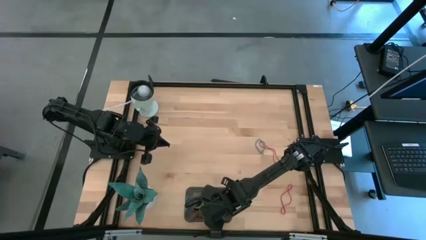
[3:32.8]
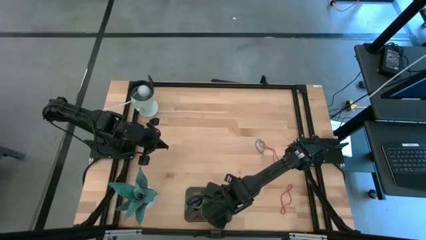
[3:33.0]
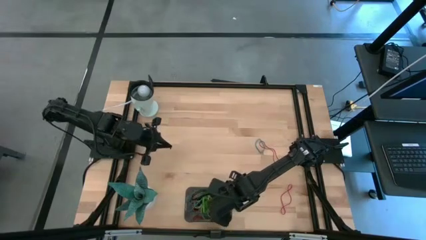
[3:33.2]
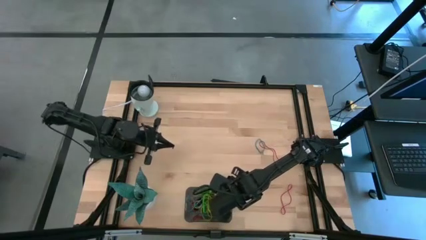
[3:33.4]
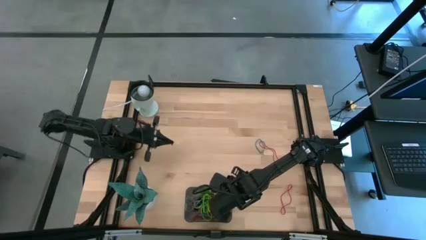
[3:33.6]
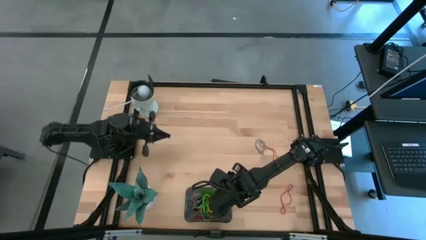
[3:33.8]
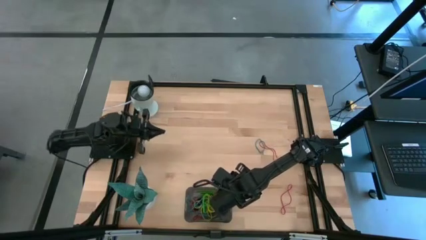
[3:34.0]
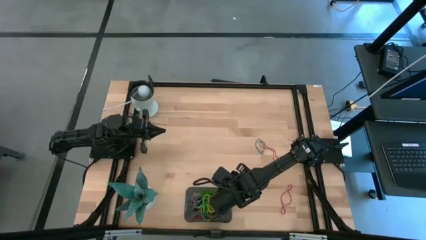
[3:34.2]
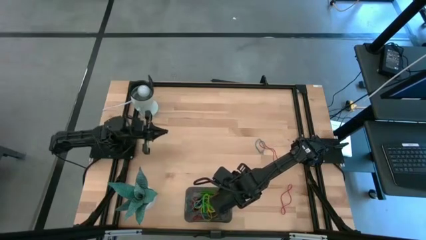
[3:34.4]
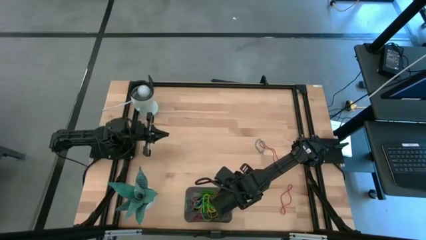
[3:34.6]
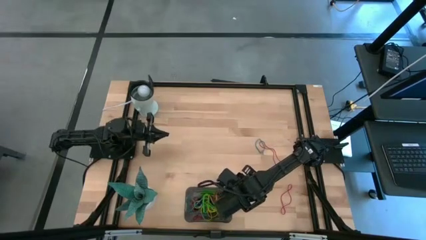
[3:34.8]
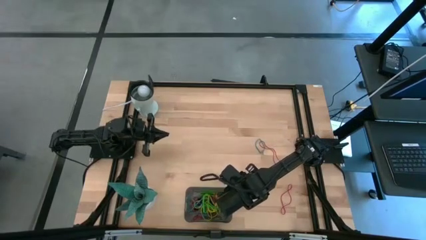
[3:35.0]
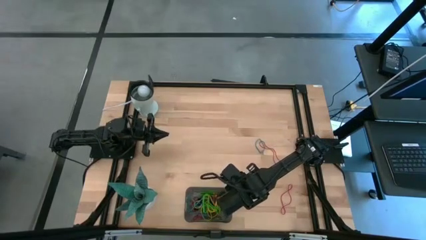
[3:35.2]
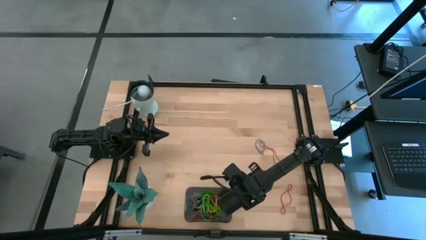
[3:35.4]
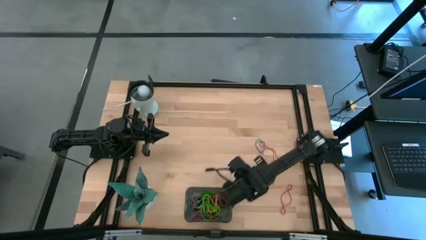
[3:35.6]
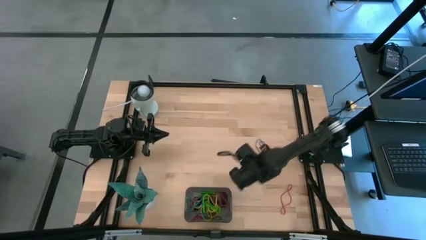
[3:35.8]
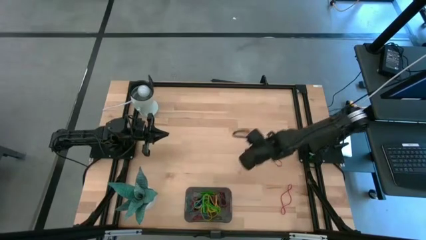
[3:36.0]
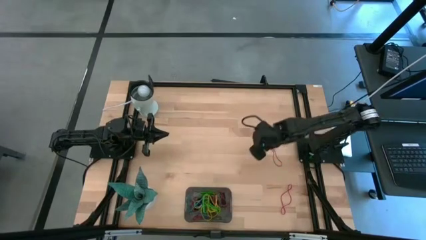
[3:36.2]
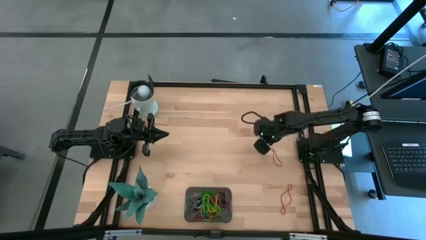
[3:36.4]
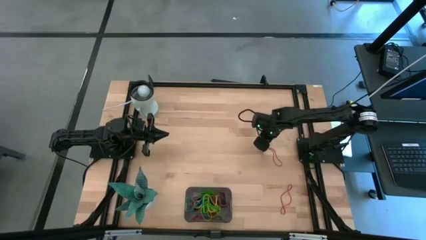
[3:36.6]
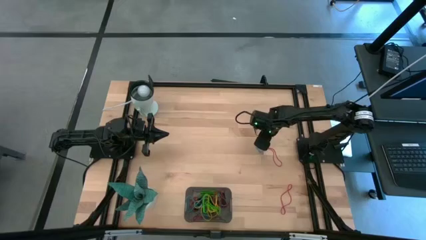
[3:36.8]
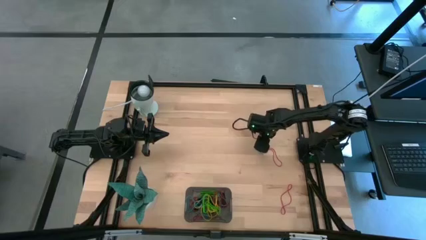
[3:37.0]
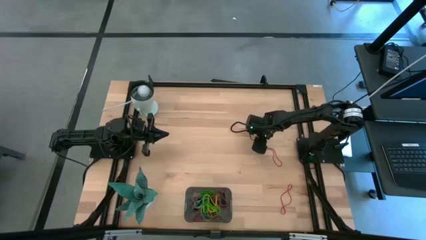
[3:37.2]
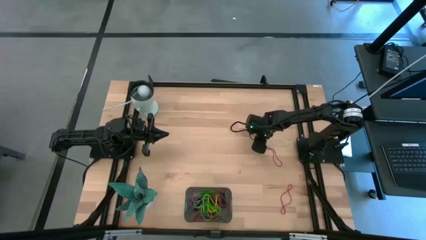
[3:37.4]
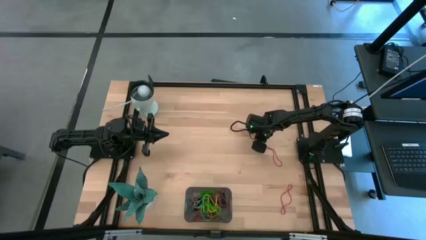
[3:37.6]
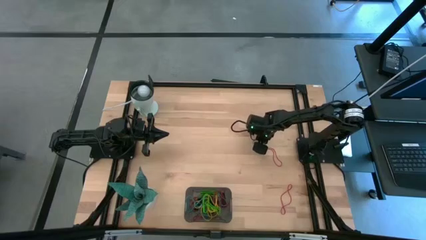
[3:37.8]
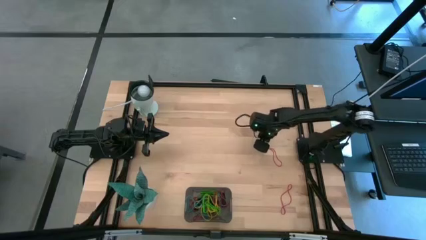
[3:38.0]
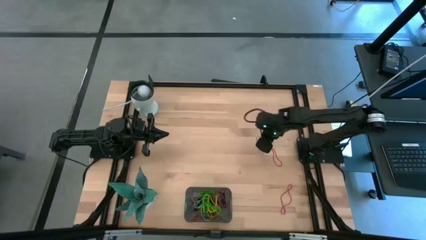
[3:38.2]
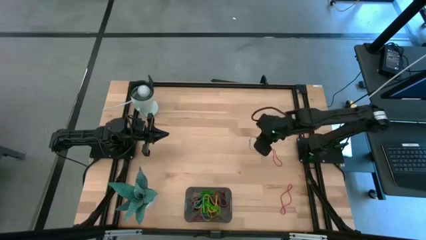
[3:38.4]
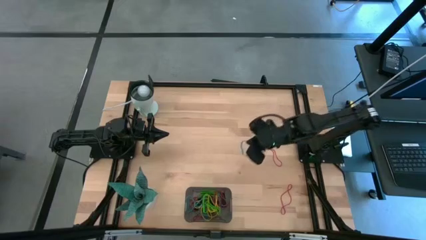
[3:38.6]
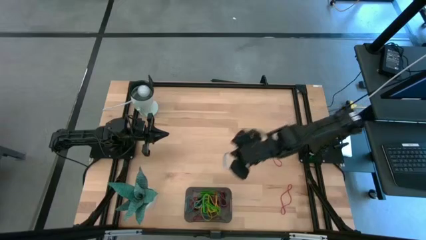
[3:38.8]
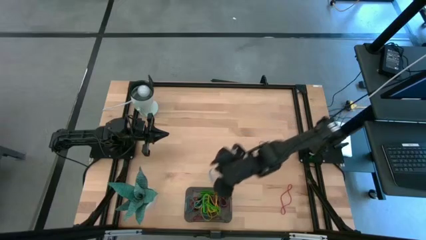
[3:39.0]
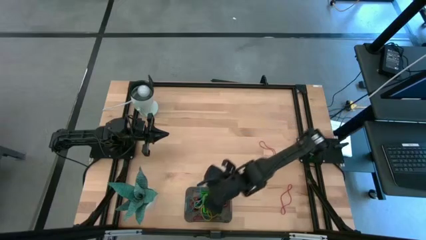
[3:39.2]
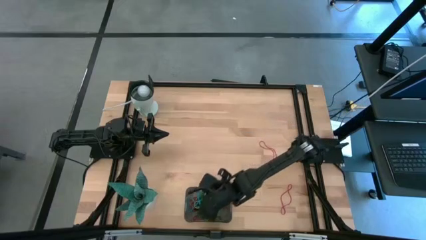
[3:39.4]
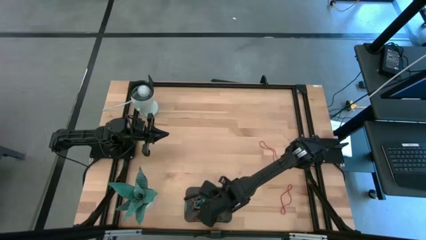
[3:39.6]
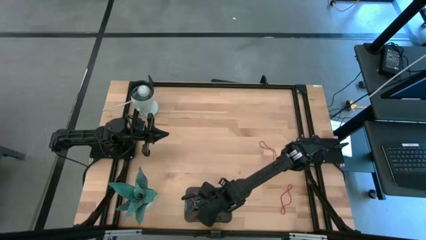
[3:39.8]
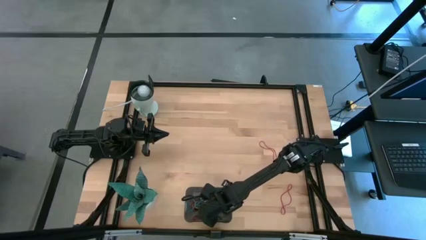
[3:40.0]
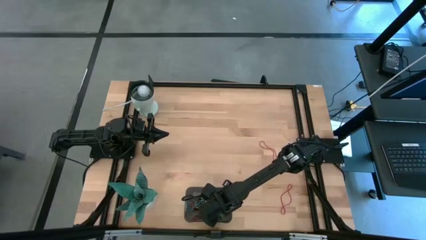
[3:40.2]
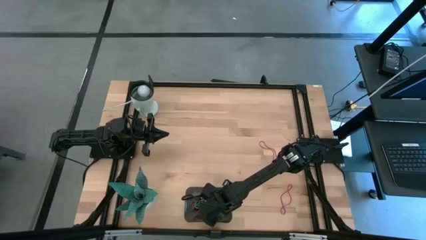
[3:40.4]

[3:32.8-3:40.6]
Task: Pick and place rubber bands into bin
Put the blue rubber band into the black bin

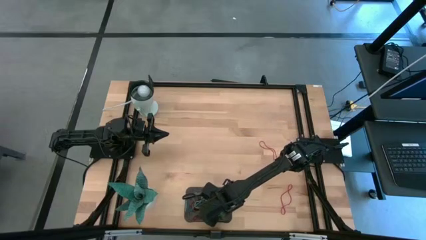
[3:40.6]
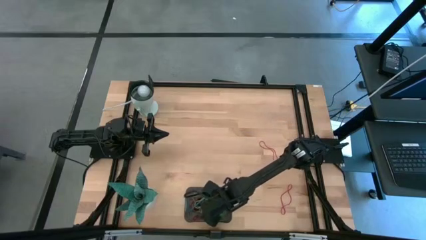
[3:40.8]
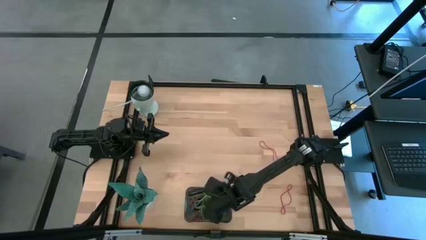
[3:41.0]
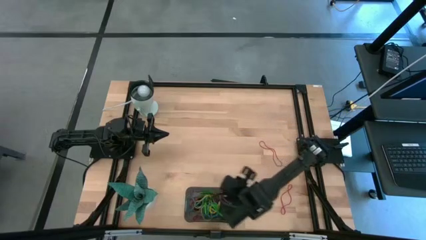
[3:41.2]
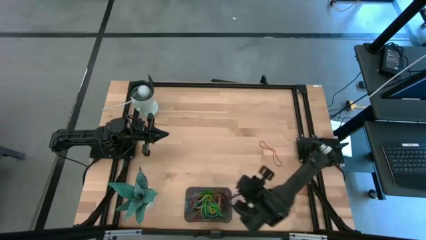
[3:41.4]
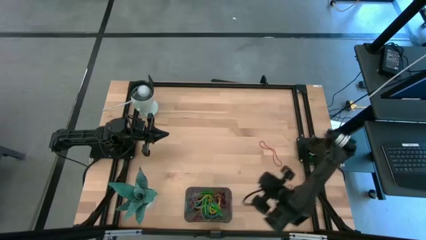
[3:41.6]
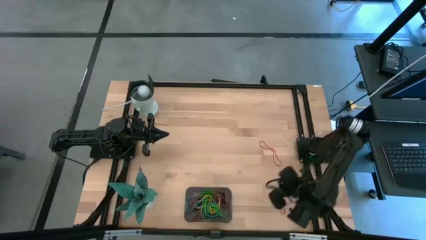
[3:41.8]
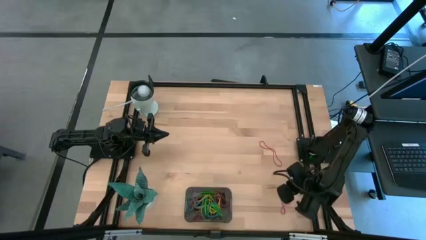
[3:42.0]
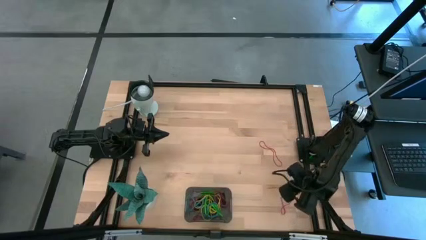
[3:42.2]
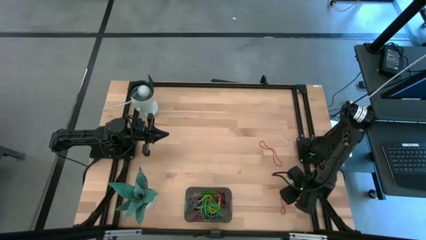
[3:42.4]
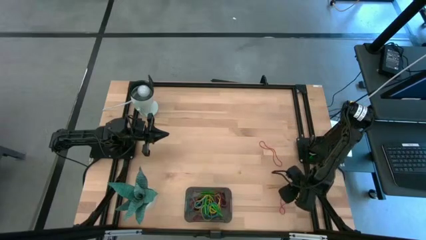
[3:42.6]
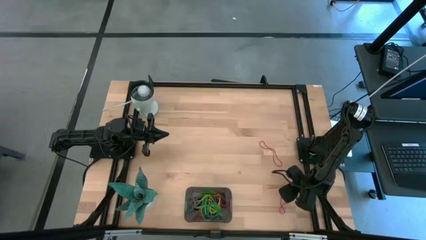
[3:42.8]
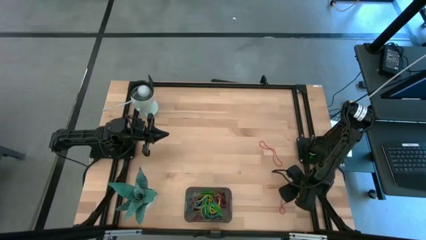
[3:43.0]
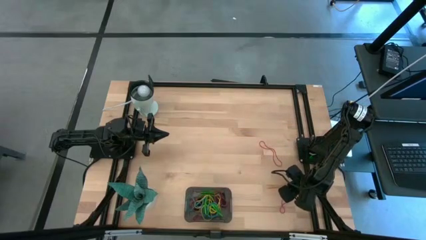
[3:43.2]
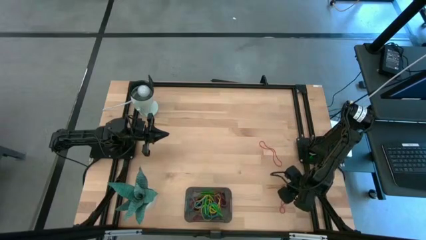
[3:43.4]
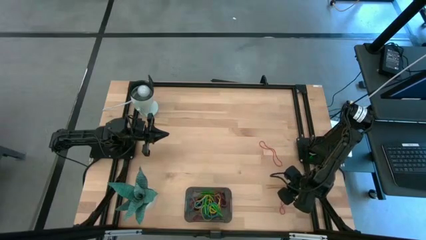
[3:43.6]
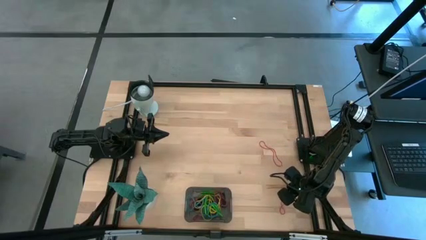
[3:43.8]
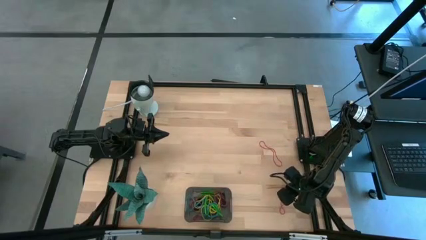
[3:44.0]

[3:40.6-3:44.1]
Put the red rubber band into the black bin

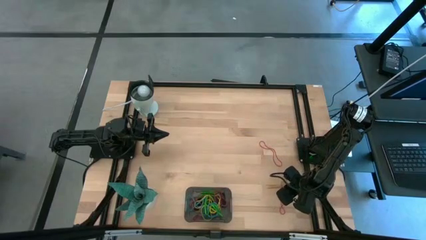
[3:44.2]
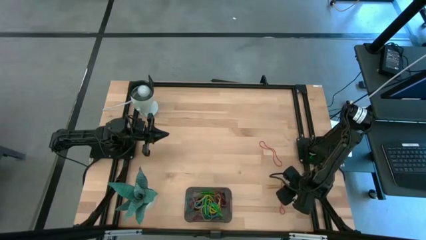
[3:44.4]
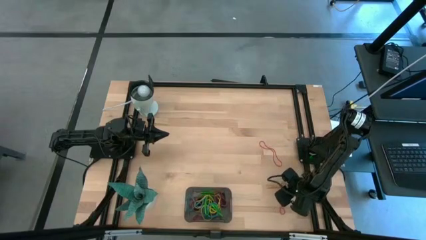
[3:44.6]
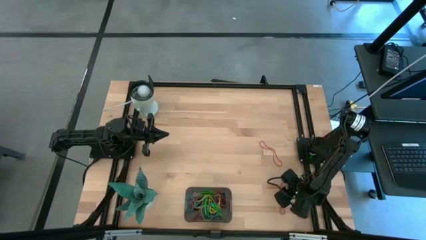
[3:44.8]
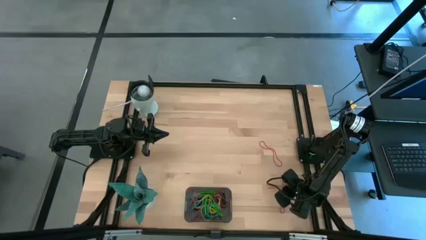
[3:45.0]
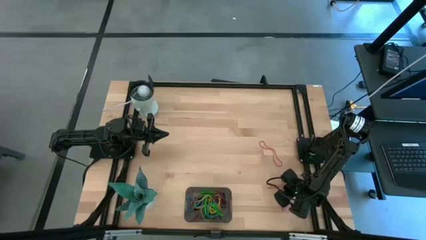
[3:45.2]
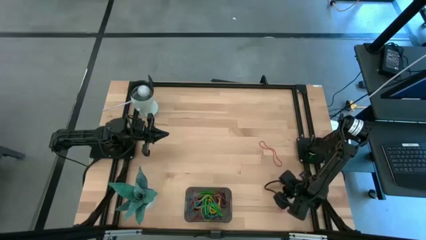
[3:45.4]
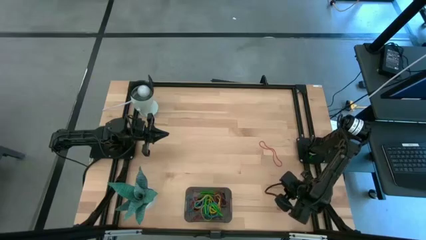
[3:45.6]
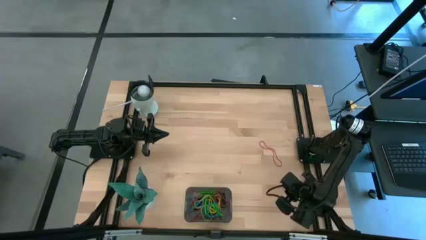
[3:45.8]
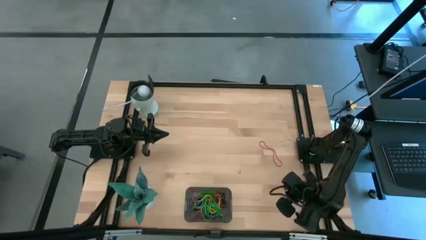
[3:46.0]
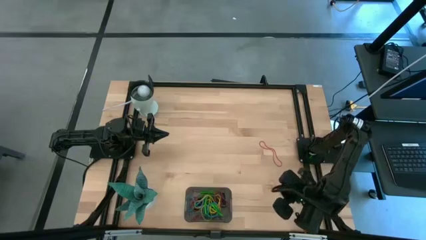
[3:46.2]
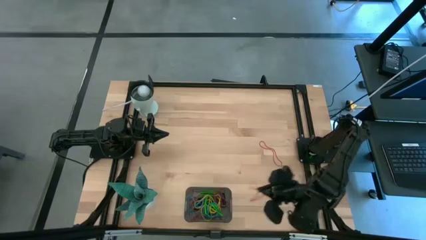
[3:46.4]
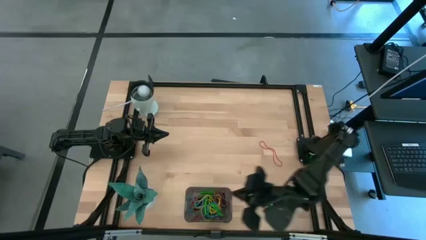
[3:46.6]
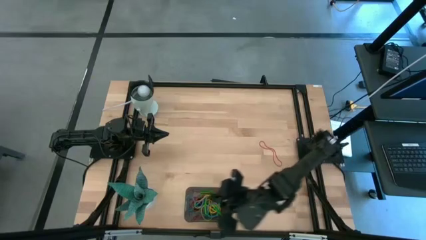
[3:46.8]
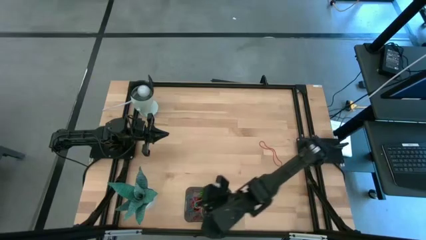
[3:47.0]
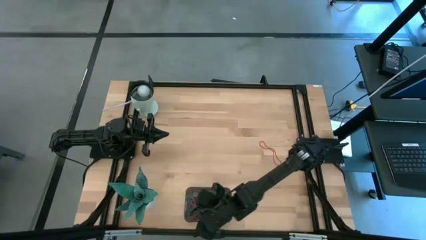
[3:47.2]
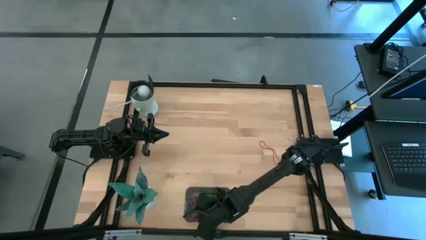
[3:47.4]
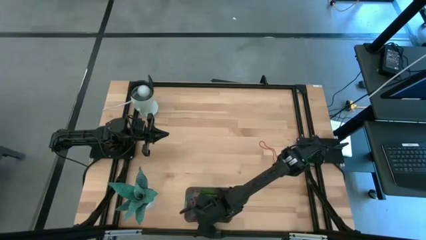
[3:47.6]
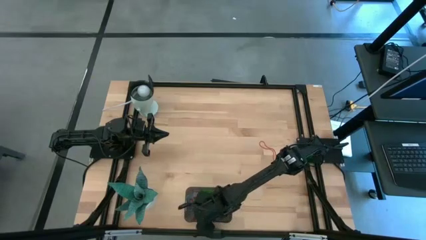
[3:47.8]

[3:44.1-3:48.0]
Put the red rubber band into the black bin

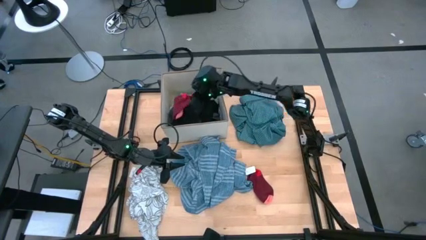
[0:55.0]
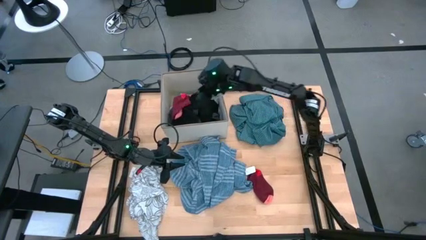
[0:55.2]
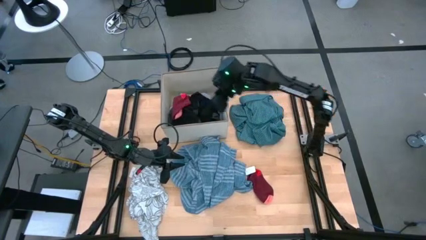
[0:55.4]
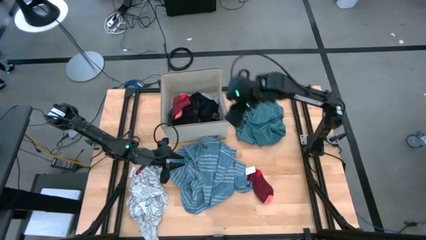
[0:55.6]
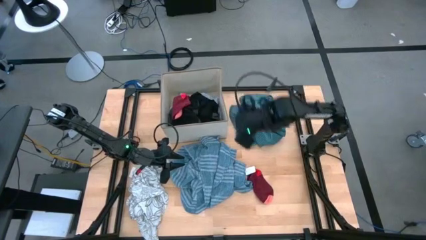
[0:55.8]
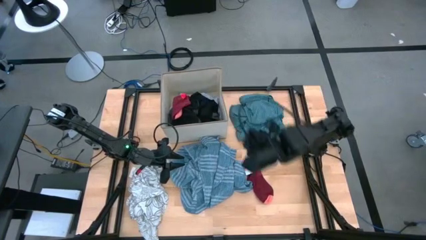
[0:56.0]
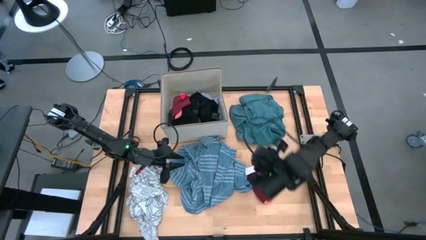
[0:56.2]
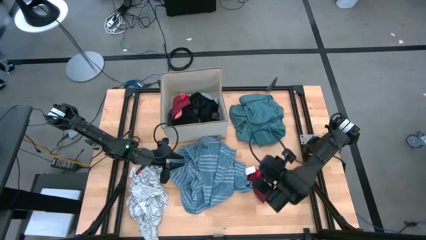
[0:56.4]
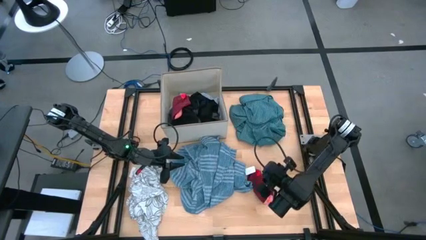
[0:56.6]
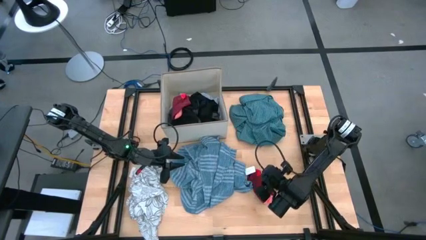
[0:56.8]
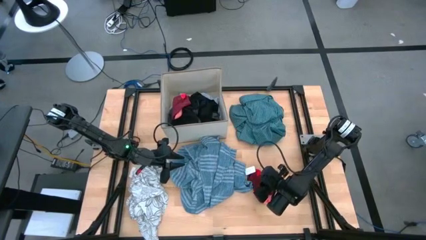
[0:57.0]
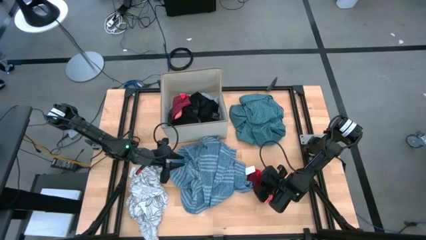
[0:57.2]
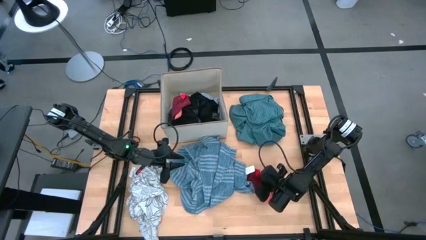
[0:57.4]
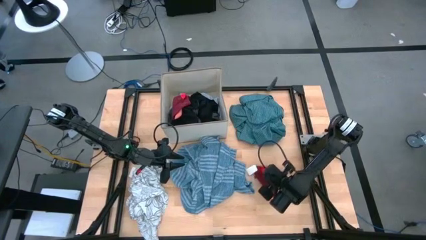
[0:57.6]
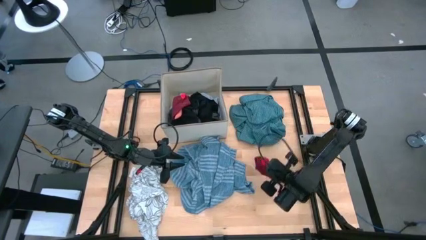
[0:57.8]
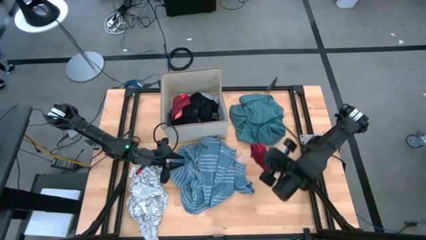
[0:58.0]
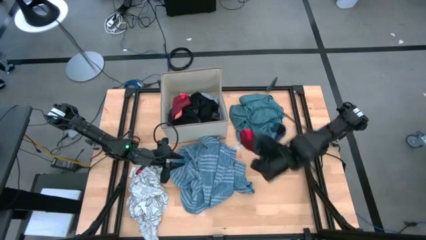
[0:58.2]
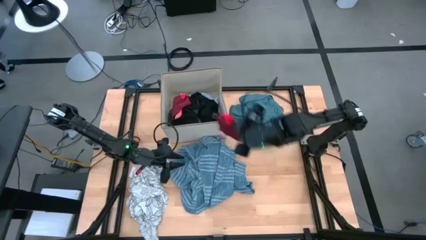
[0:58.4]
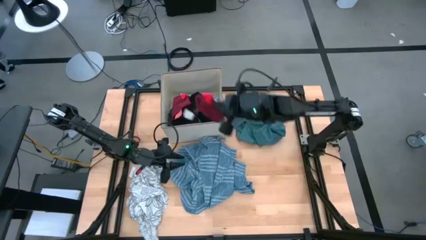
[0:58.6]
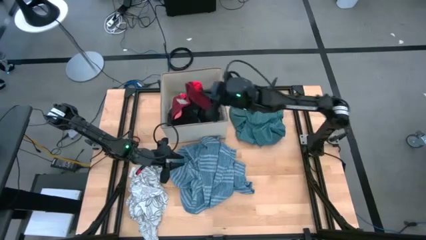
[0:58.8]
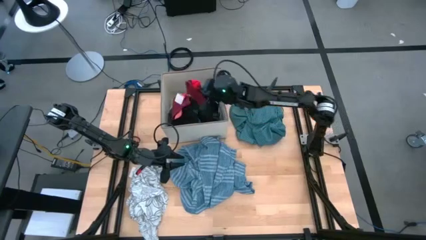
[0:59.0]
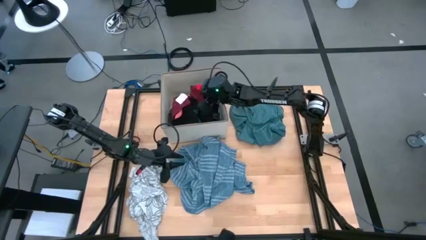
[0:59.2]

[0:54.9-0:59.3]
Task: Sort clothes
Put the red sock into the white laundry organizer
